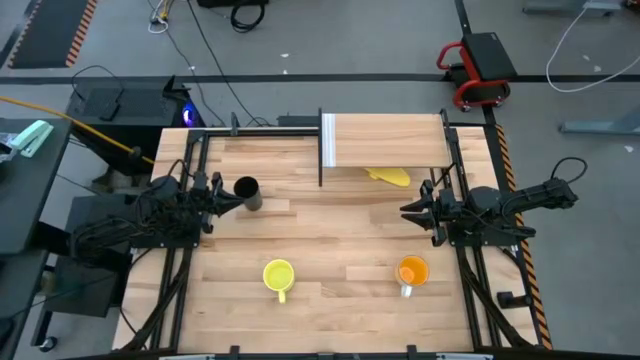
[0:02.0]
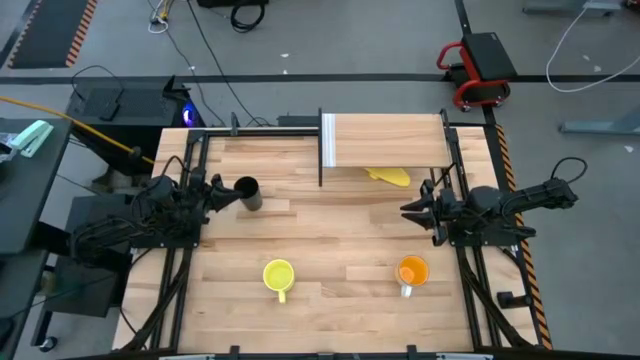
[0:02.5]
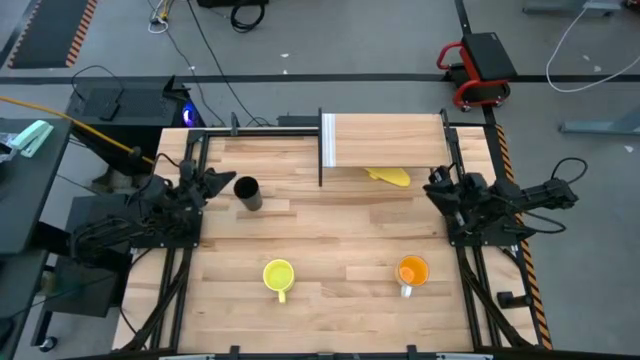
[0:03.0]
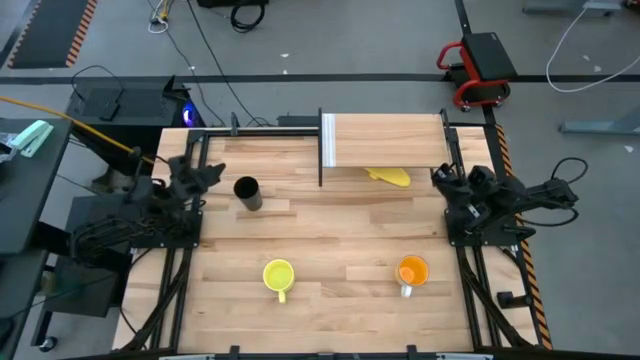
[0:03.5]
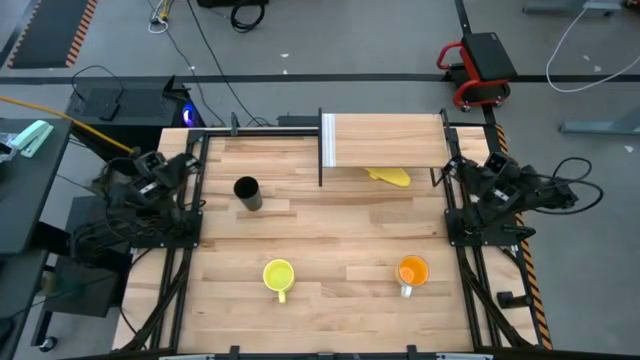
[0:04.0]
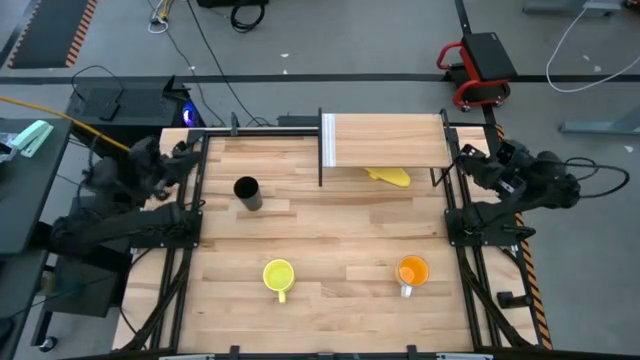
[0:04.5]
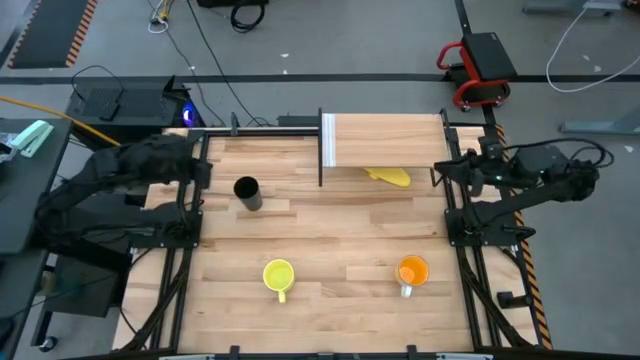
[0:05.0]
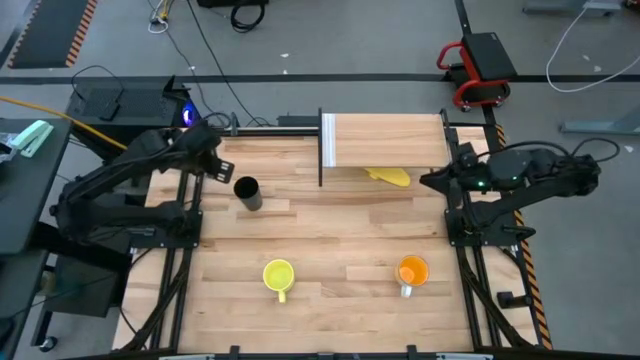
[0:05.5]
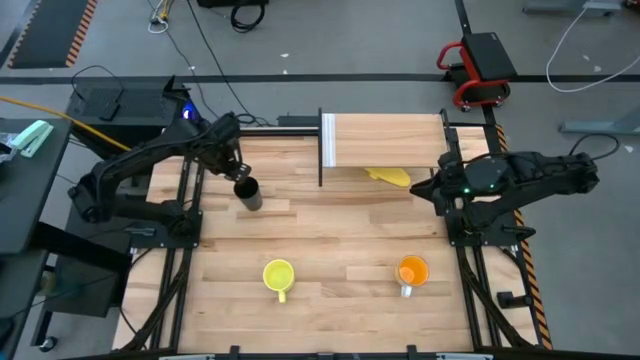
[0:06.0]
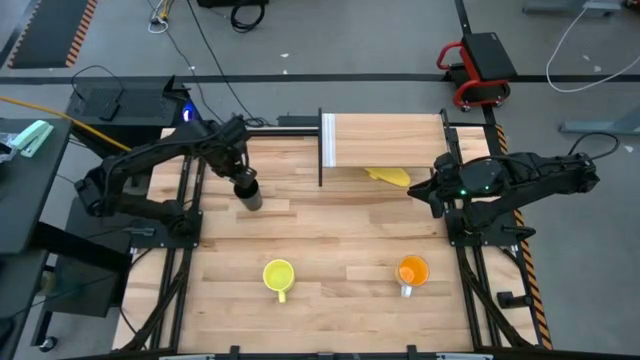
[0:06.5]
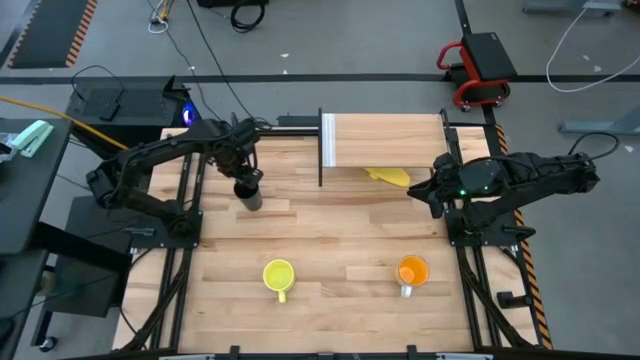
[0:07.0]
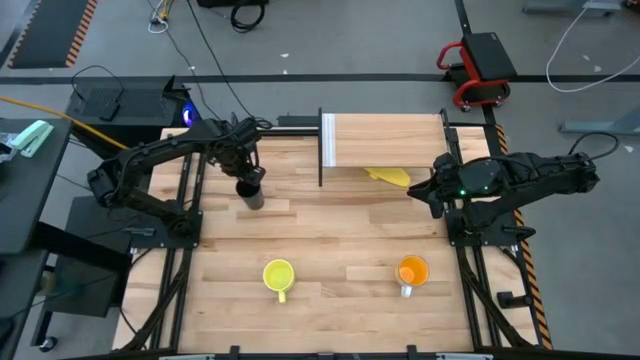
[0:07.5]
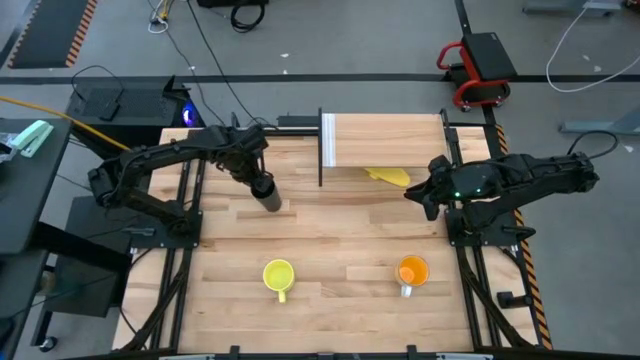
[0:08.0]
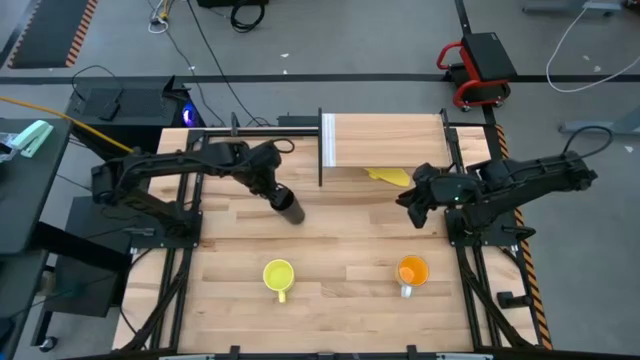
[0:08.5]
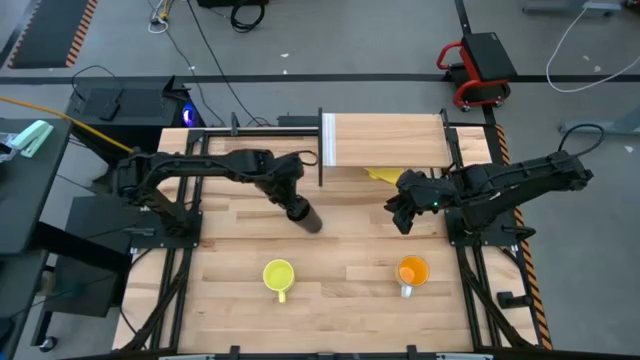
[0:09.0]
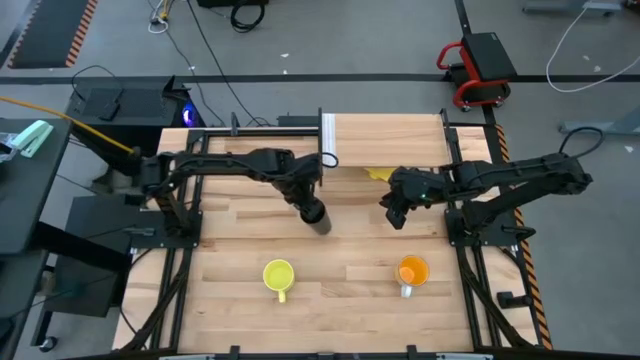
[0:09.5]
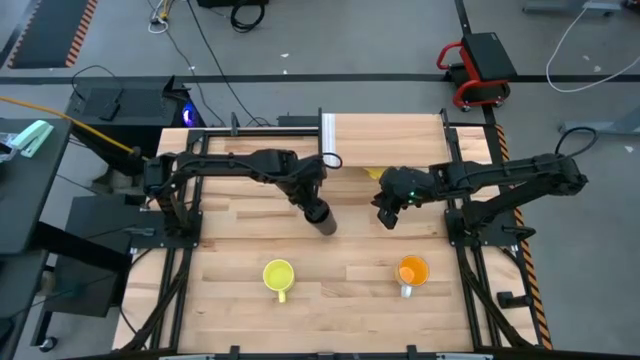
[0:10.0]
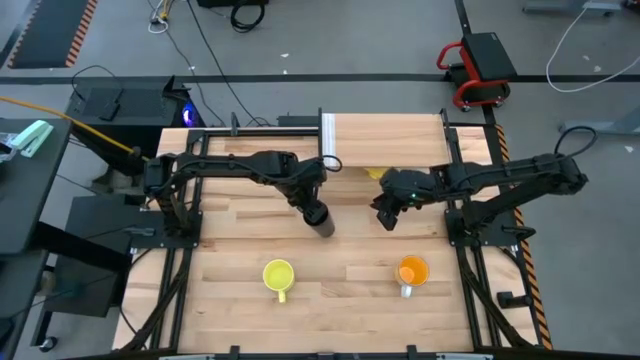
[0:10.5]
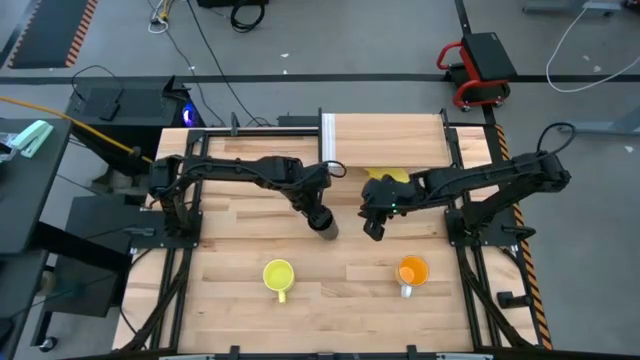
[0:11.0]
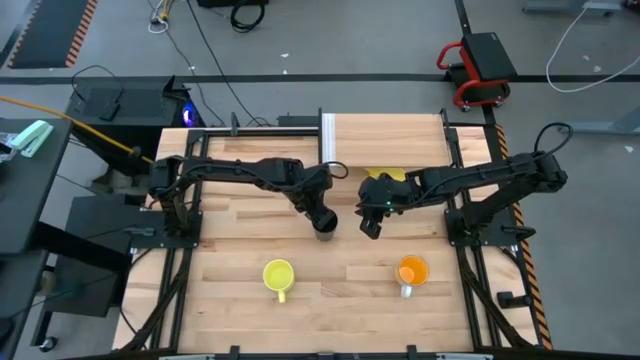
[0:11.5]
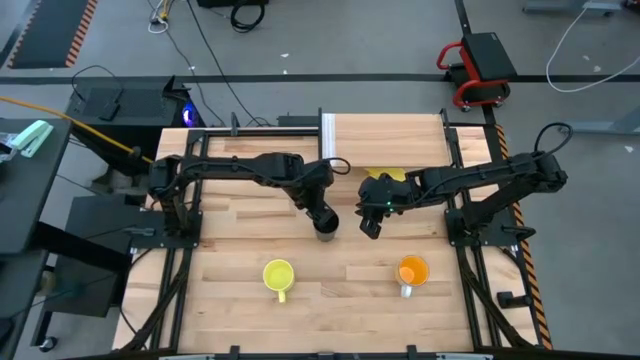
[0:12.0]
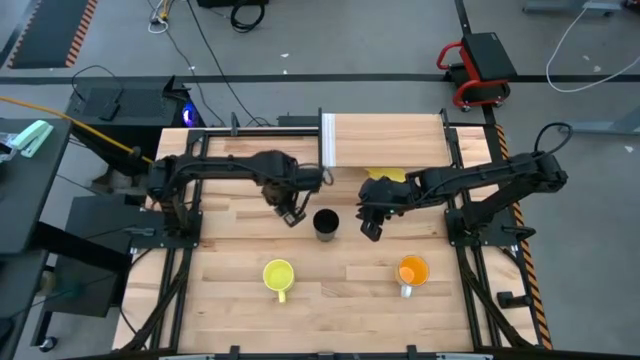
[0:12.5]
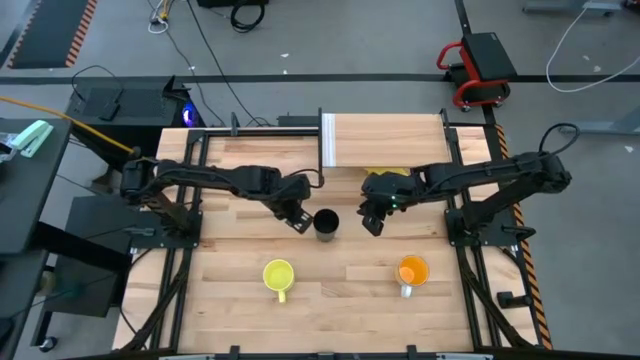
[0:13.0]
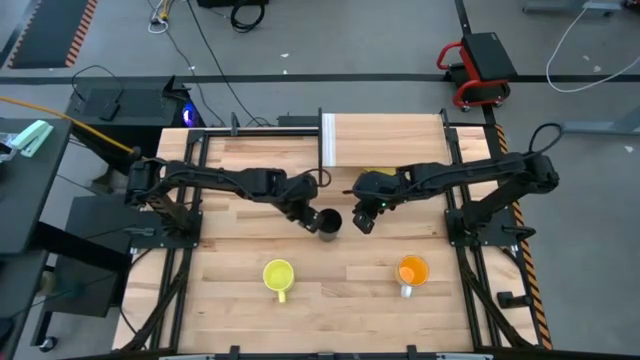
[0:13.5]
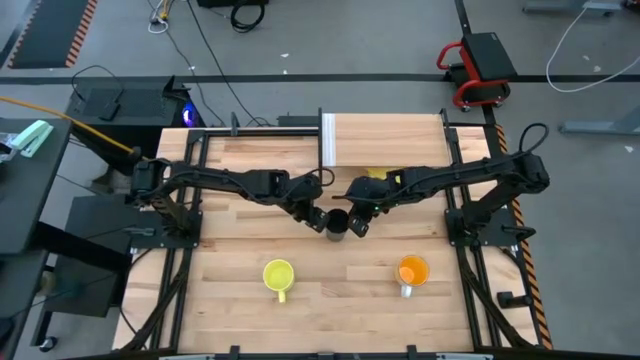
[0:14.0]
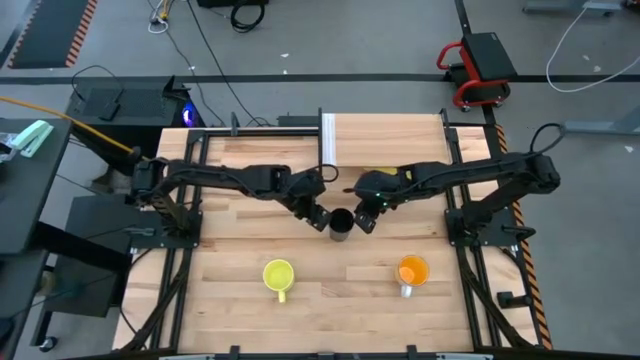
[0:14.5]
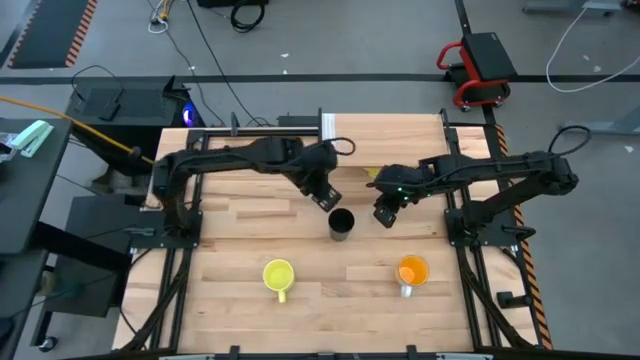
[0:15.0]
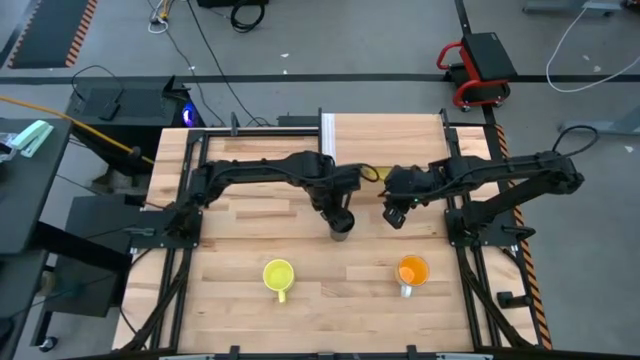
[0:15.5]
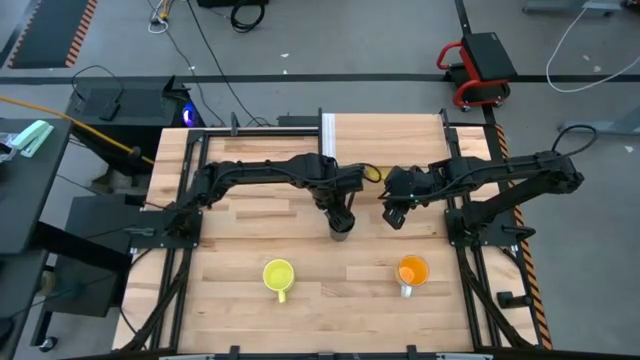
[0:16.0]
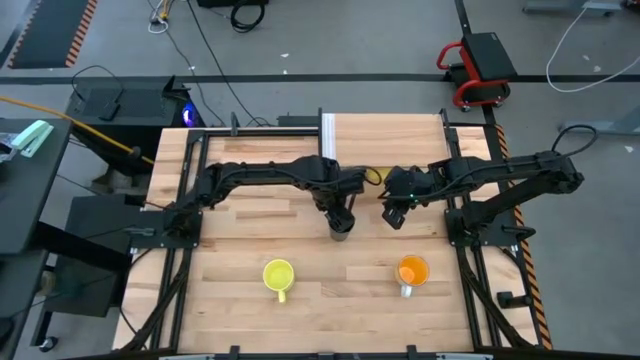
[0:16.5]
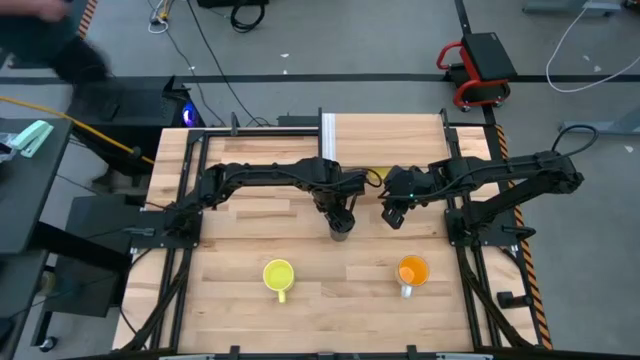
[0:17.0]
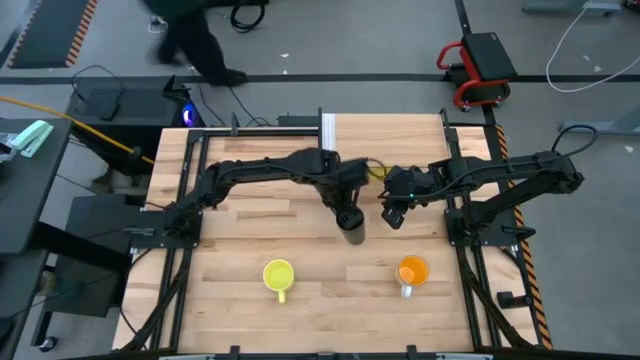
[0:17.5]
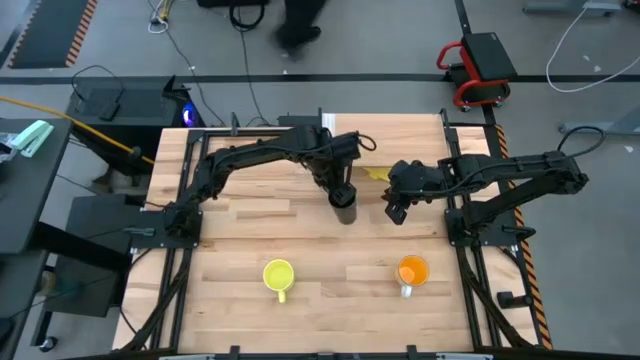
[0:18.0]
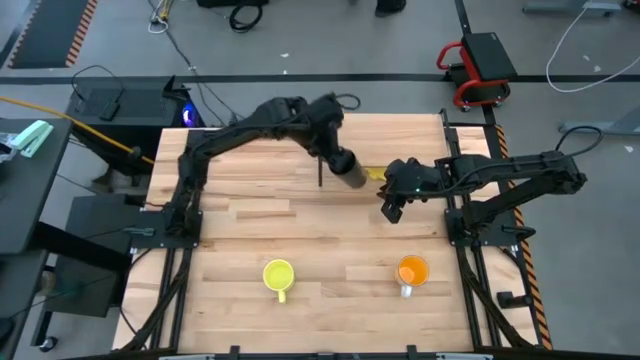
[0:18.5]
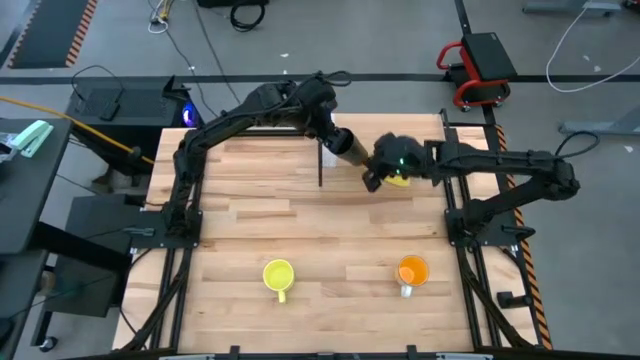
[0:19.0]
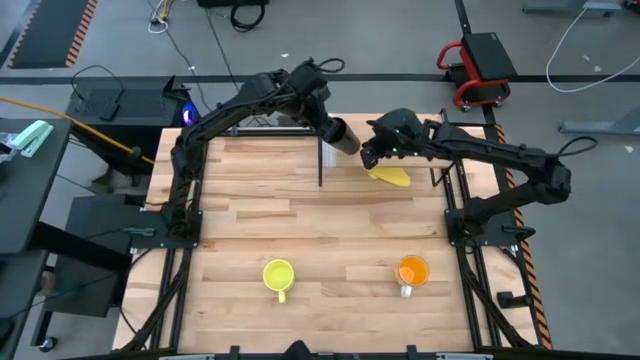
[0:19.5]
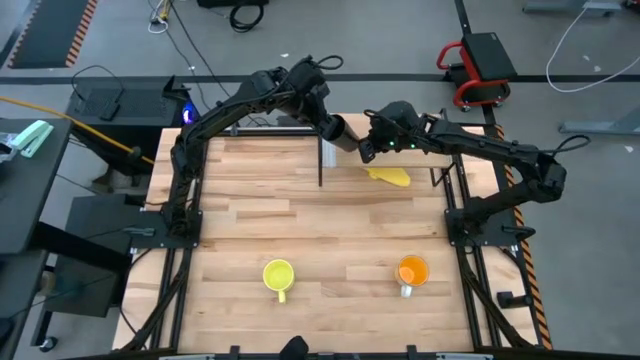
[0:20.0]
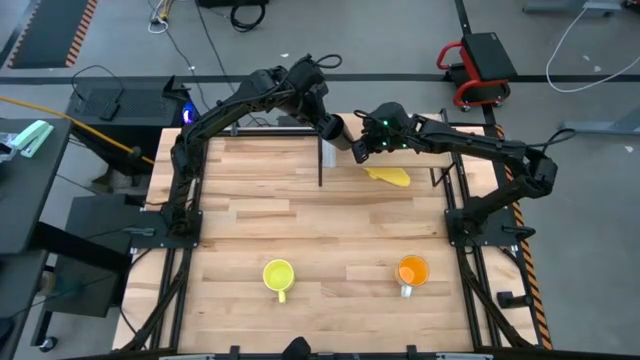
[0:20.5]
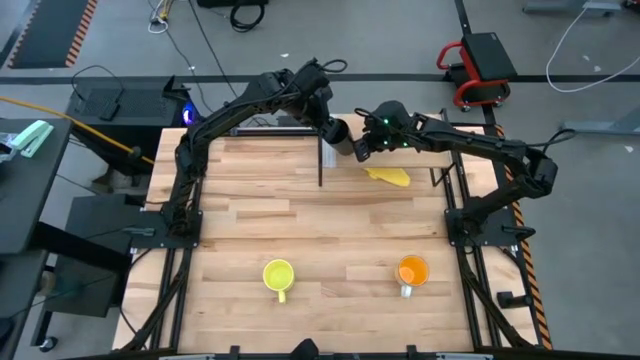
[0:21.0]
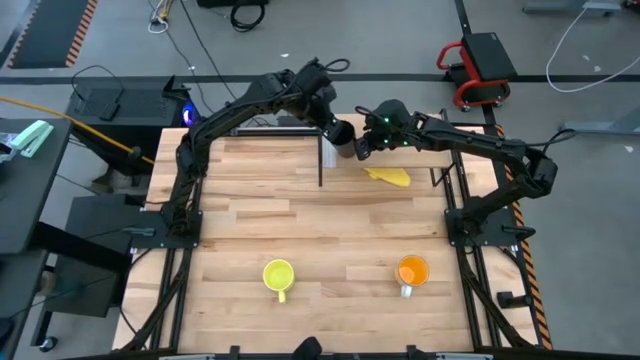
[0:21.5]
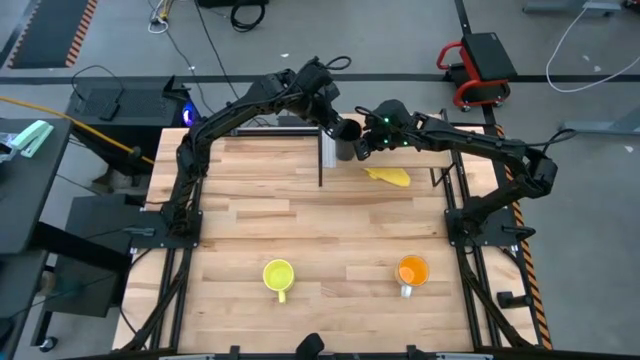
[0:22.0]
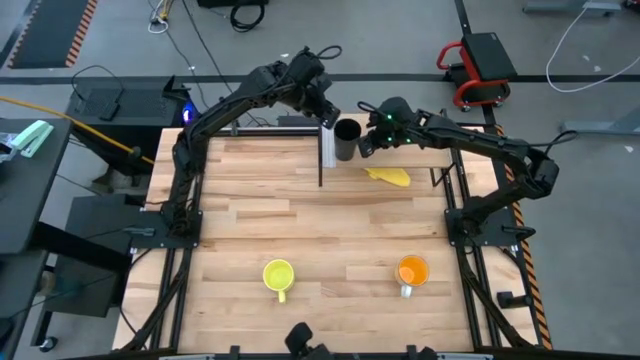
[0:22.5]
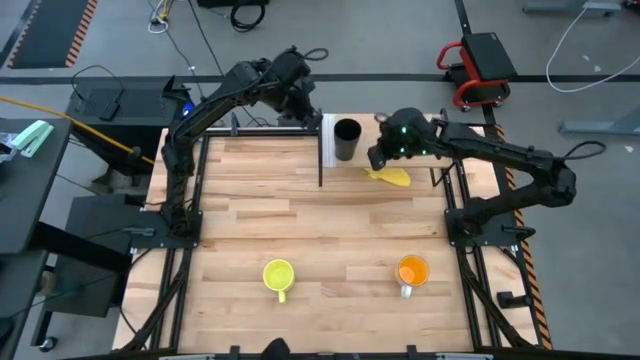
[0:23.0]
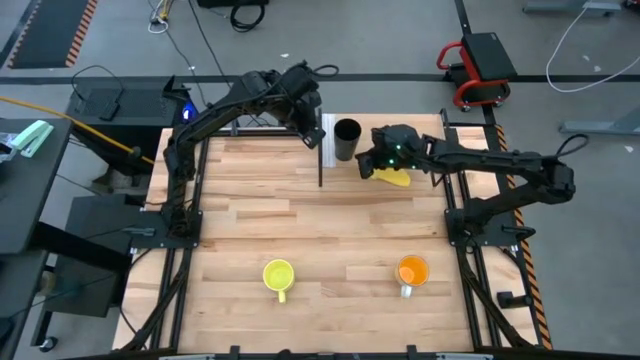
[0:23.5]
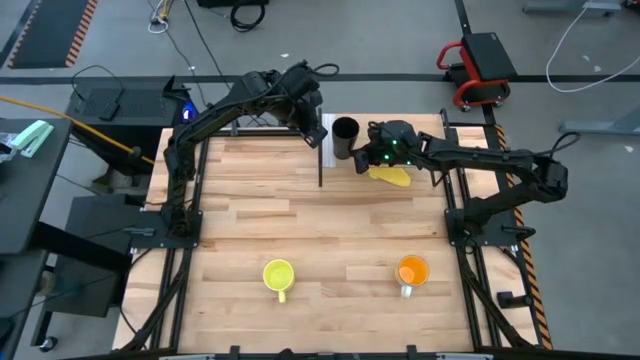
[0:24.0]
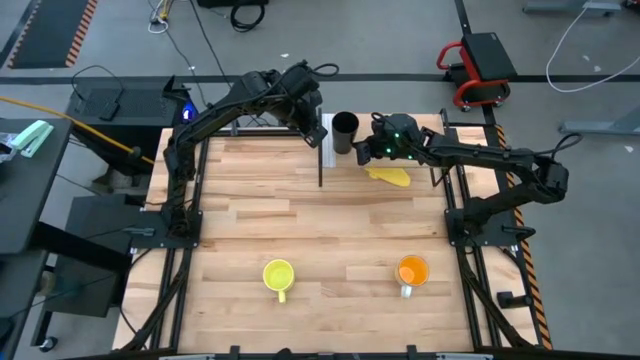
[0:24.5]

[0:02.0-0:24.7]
Task: Stack small to large cups/mugs on shelf
Put the black cup on the shelf
